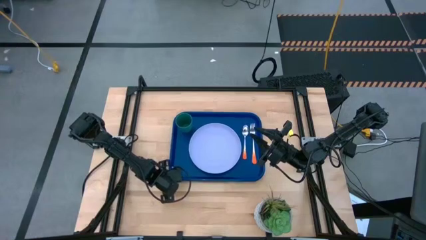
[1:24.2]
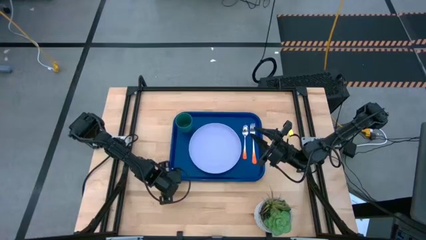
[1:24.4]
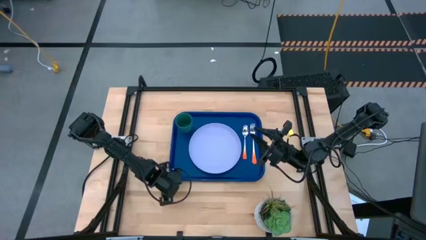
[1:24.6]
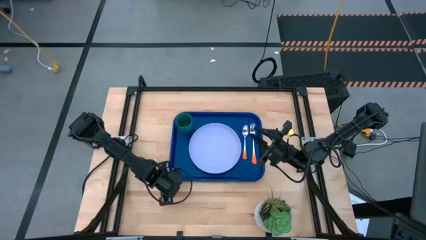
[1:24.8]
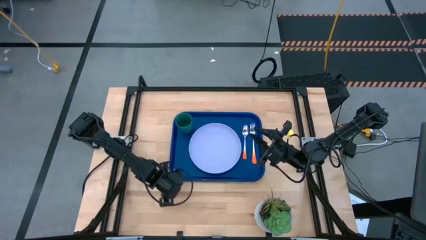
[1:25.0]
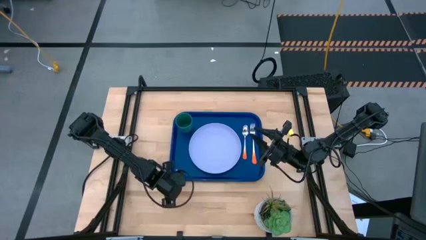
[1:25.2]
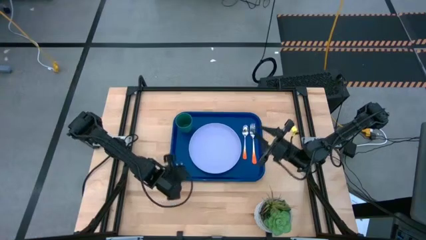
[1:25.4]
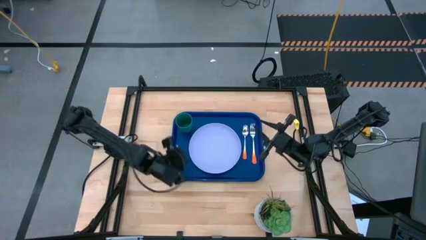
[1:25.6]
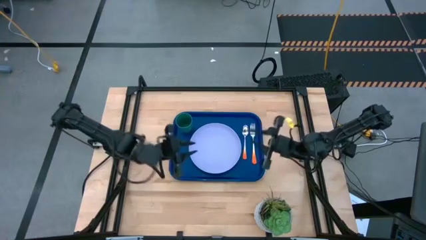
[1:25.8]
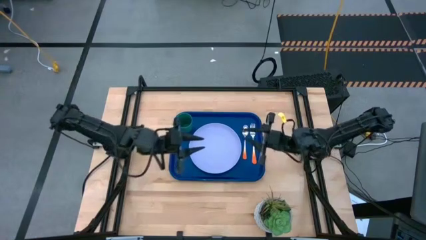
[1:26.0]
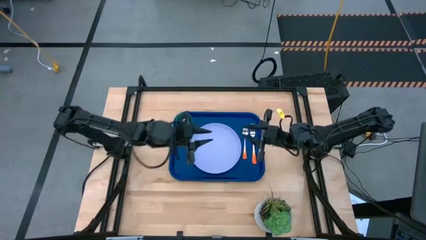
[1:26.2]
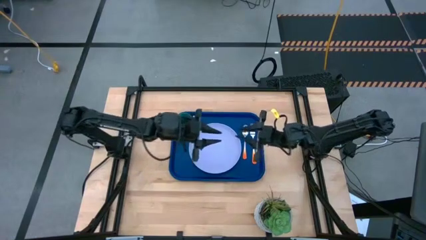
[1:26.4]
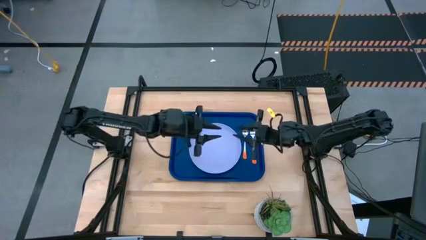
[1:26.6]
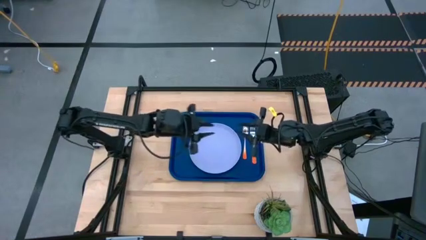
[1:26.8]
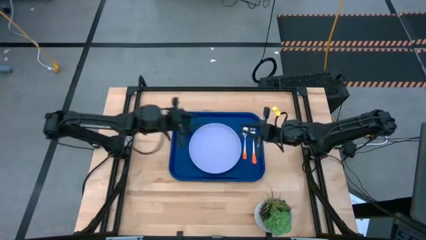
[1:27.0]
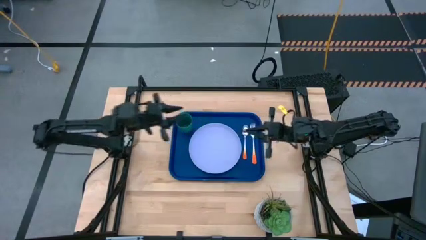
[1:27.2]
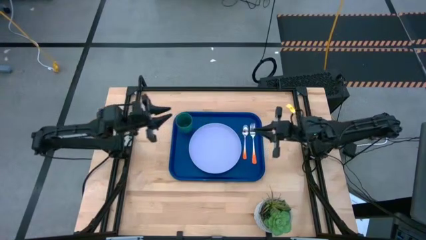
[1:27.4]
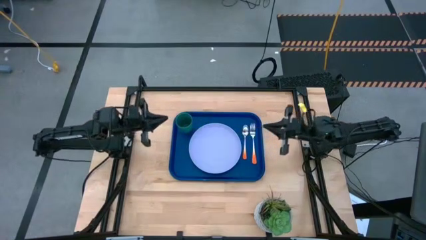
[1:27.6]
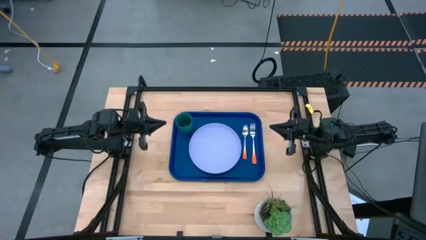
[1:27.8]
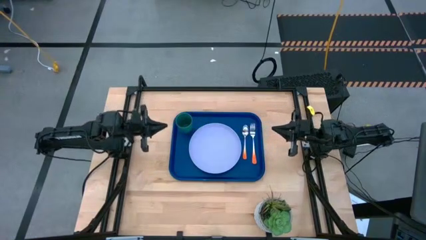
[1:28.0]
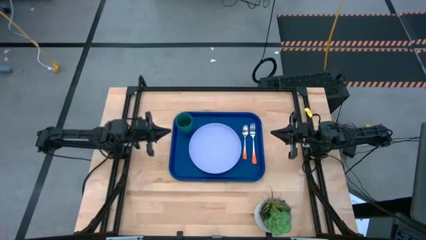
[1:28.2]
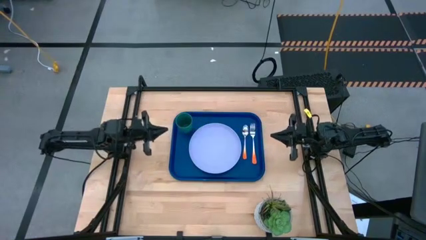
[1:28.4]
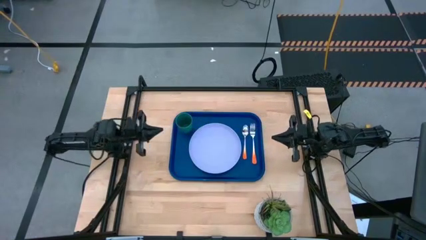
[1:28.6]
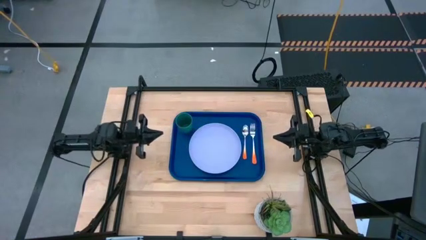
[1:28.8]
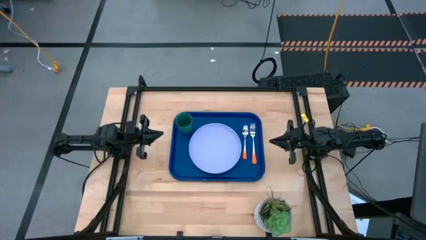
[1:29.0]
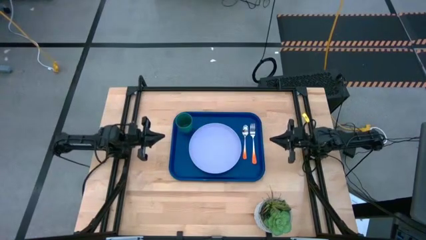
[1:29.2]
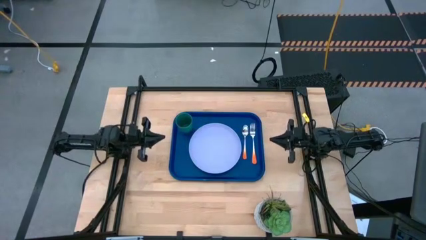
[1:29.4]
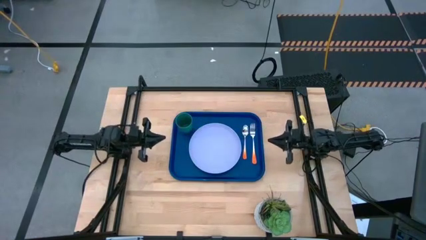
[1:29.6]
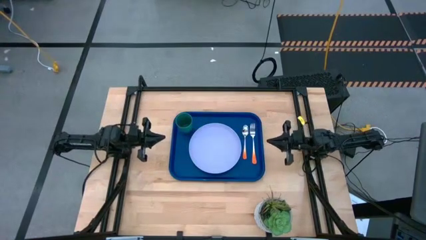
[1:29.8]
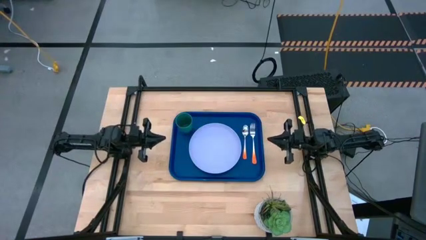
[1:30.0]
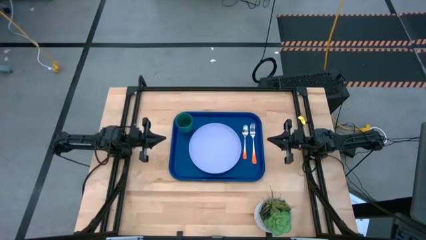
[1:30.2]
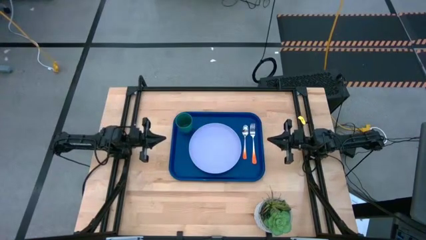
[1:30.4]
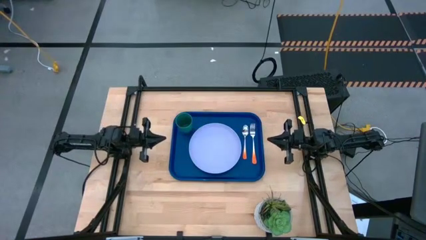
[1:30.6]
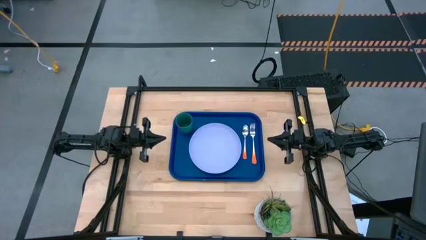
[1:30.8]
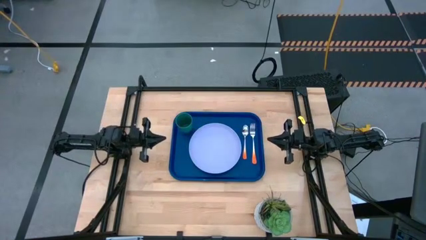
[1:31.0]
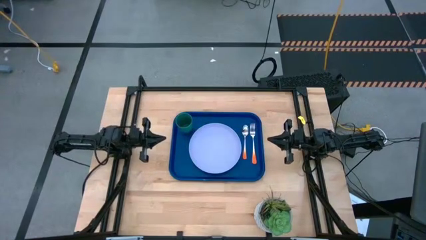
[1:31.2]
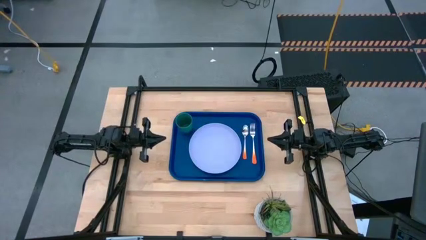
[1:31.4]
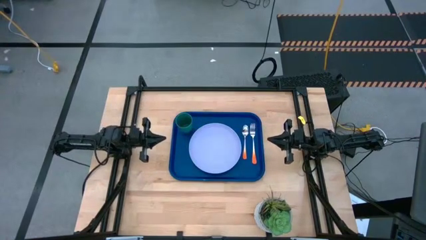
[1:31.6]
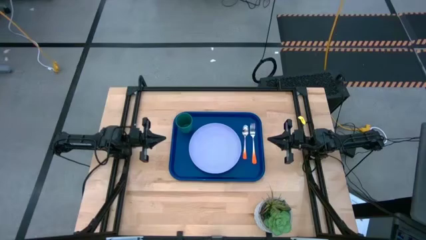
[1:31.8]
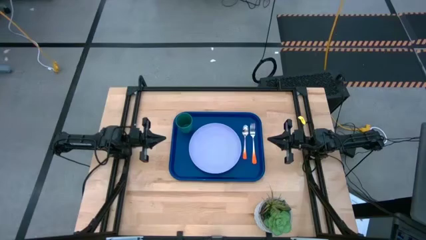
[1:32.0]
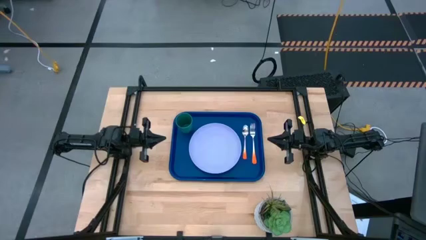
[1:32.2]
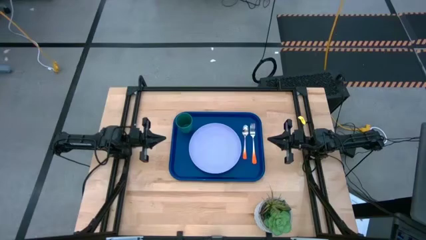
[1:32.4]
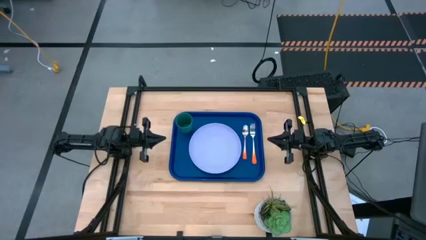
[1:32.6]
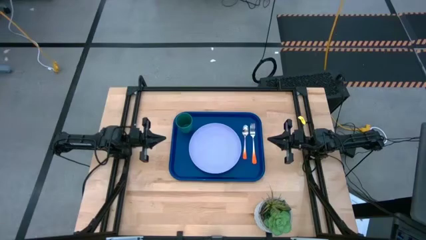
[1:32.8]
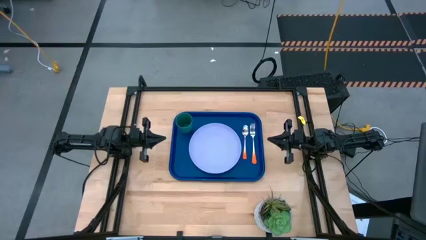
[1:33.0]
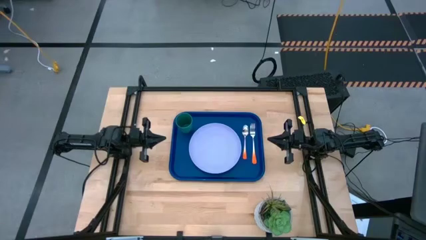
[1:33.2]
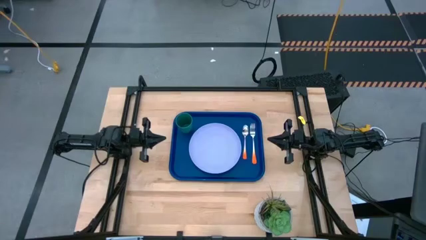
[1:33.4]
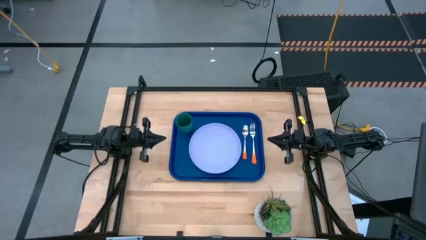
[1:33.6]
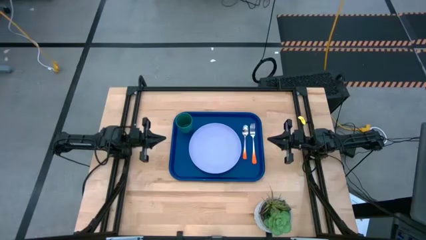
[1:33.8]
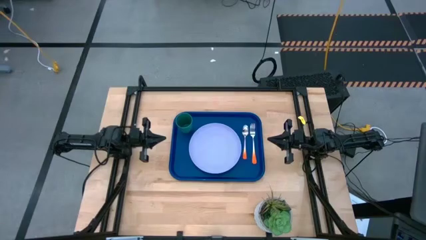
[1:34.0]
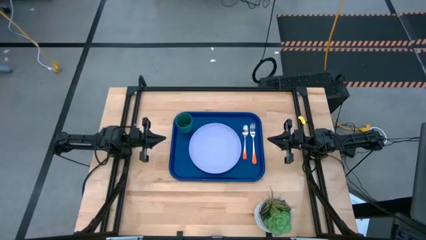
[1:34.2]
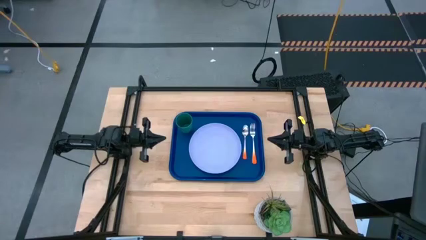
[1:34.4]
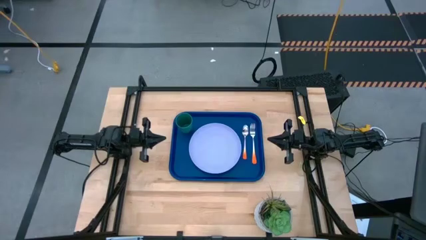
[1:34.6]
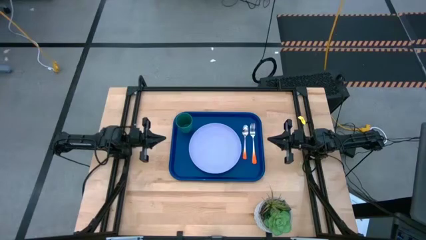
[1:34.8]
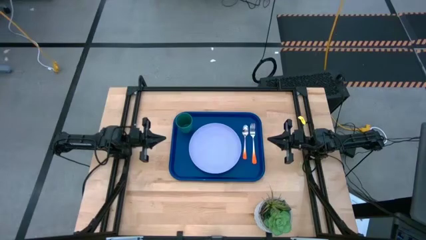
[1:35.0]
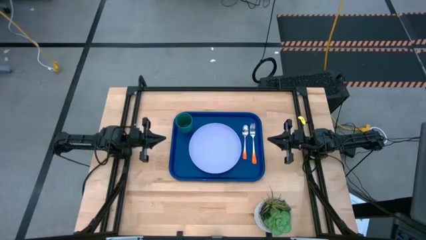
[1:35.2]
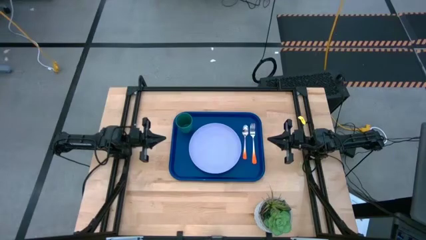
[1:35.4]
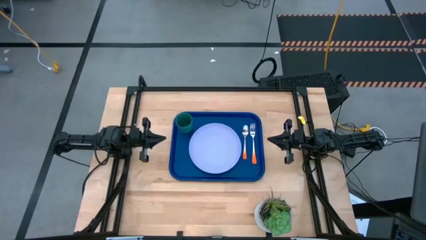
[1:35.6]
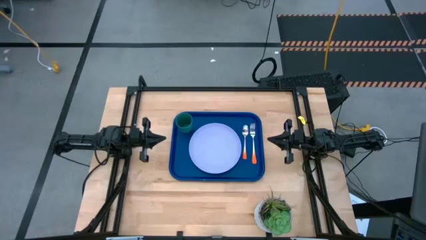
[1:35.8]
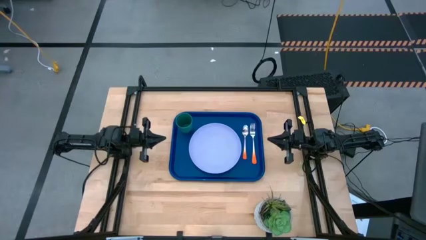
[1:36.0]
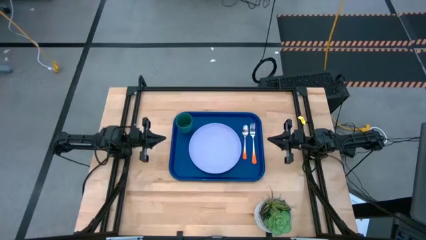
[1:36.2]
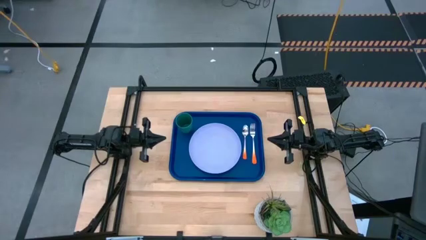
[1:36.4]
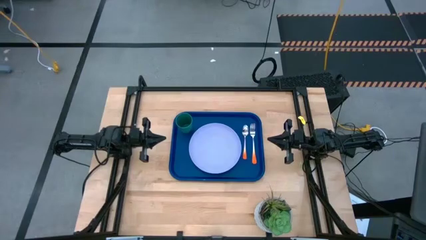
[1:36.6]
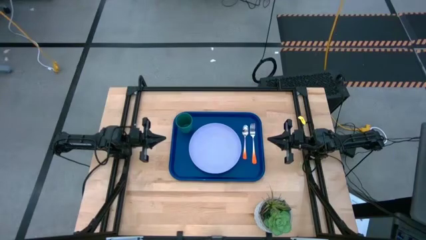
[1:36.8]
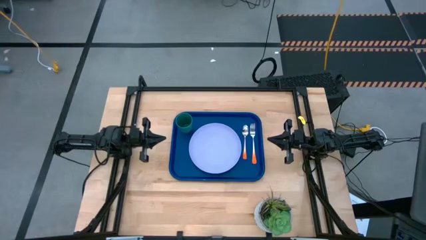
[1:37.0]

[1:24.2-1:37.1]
Task: Pick and place plate/cup/fork/spoon on tray
Return to Home Position
